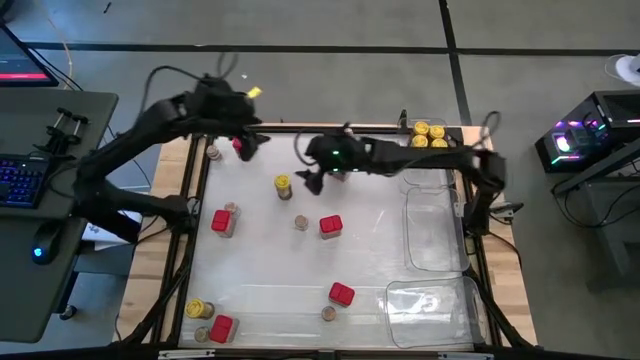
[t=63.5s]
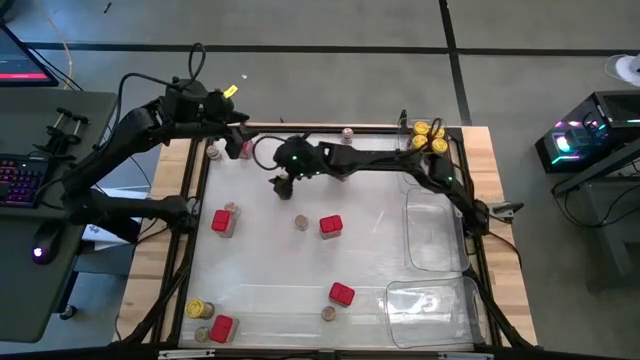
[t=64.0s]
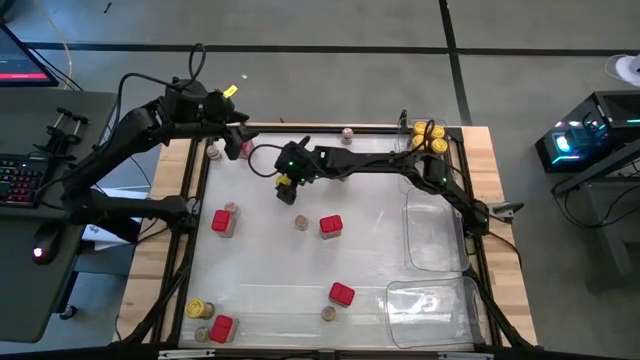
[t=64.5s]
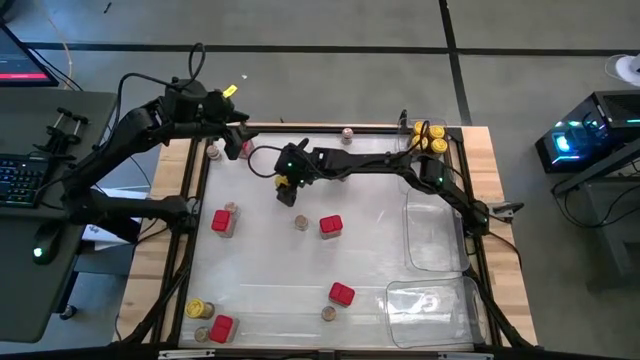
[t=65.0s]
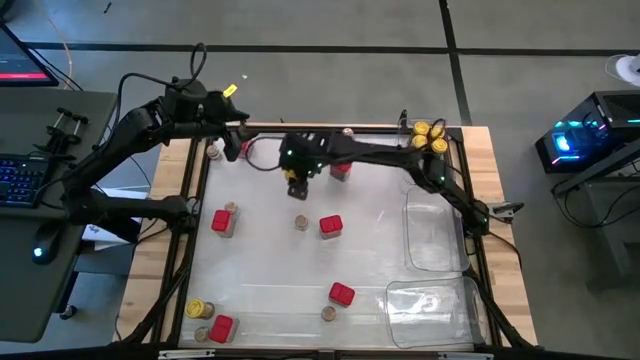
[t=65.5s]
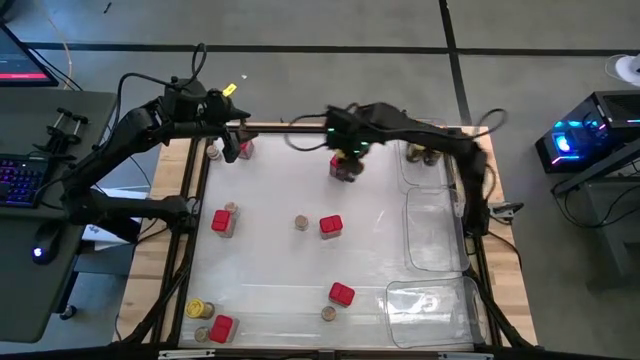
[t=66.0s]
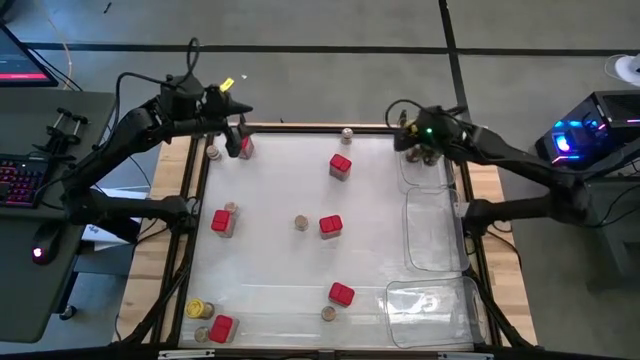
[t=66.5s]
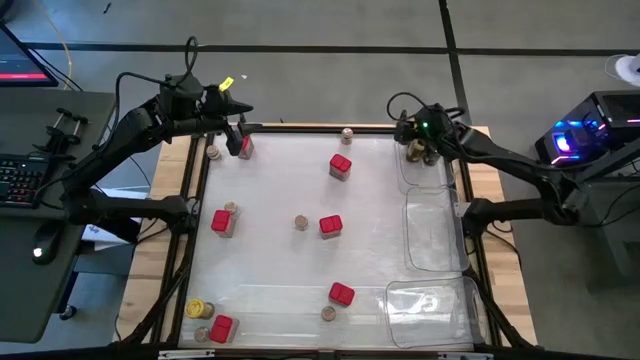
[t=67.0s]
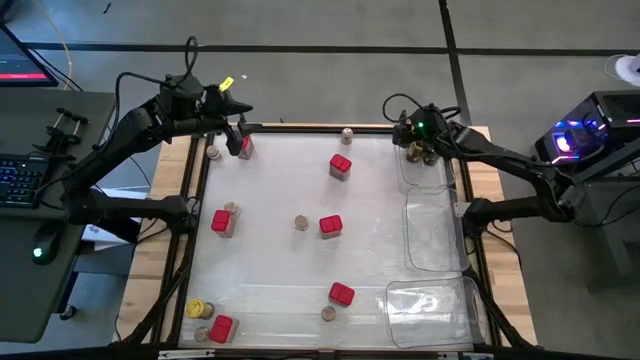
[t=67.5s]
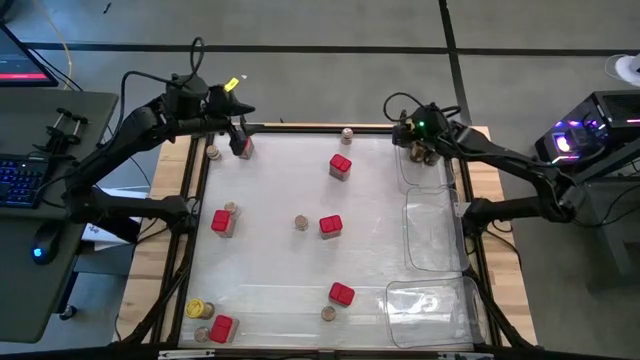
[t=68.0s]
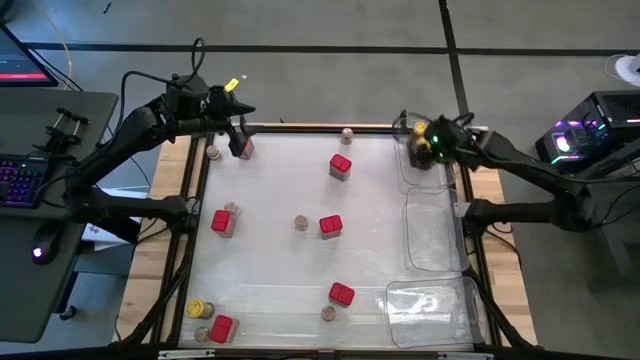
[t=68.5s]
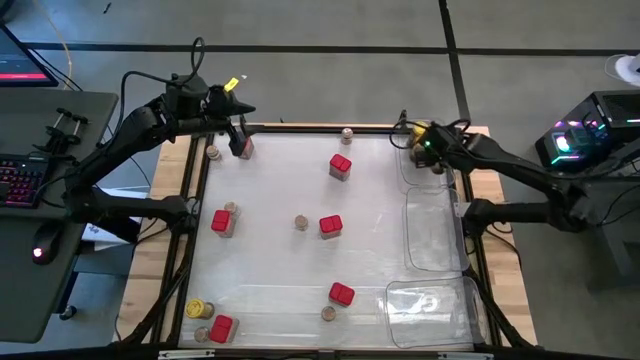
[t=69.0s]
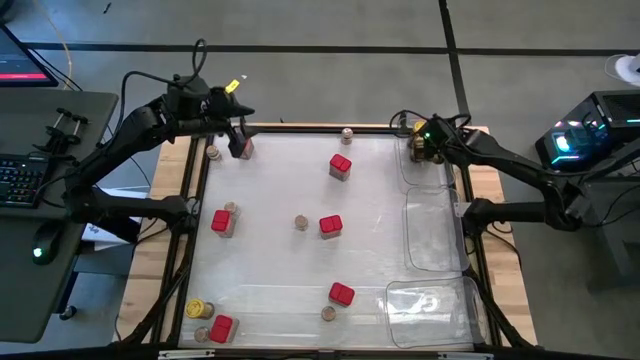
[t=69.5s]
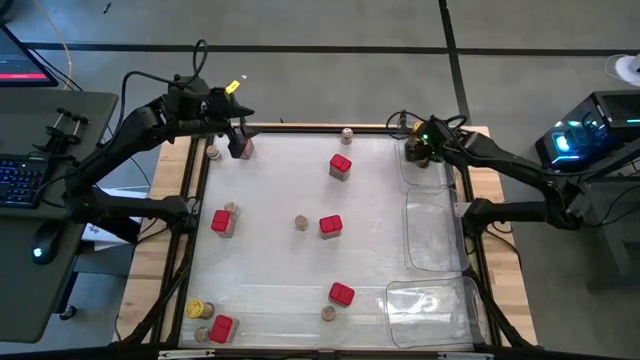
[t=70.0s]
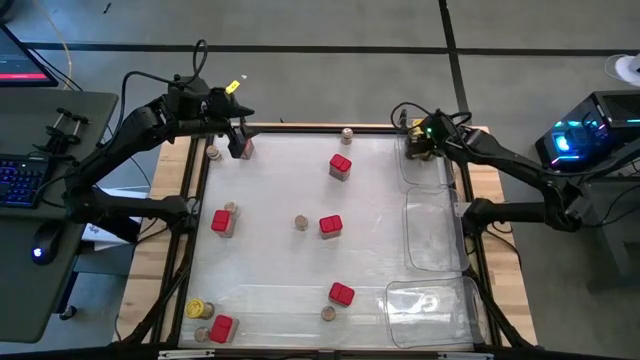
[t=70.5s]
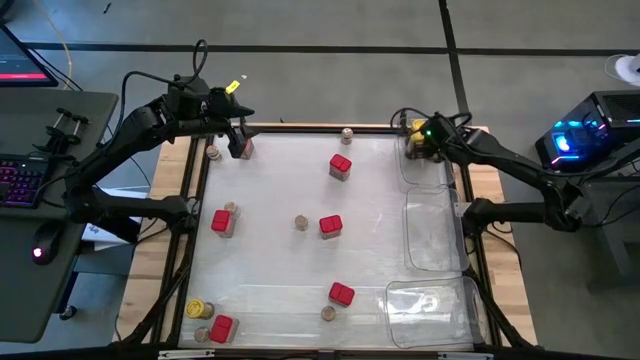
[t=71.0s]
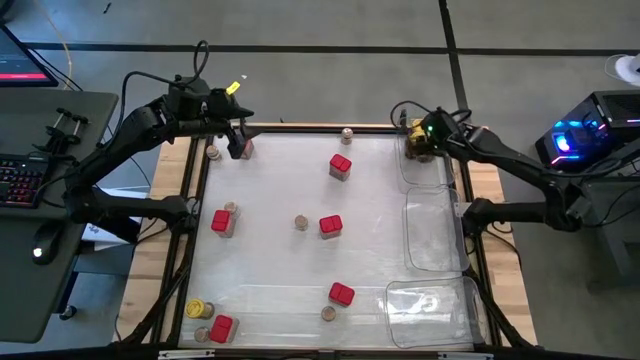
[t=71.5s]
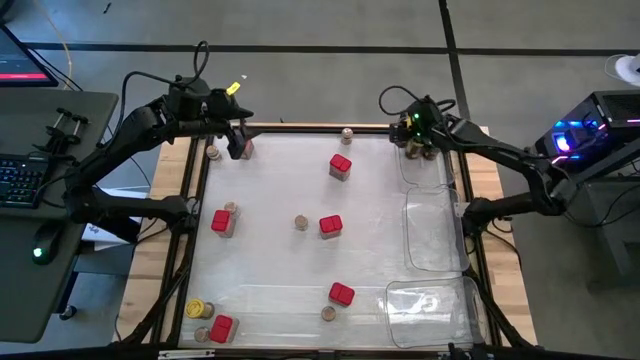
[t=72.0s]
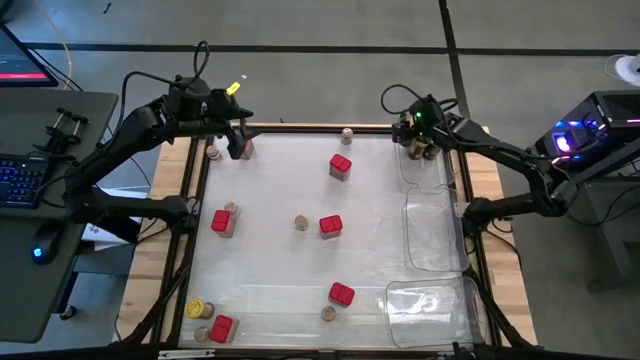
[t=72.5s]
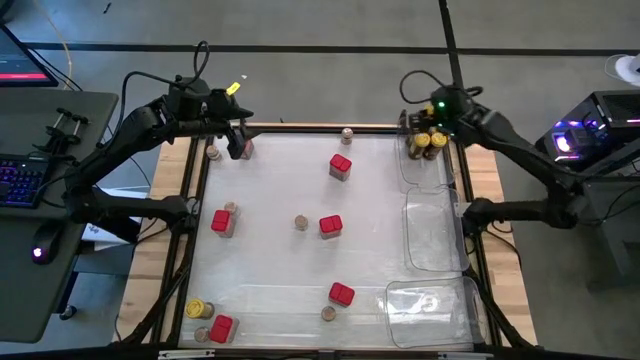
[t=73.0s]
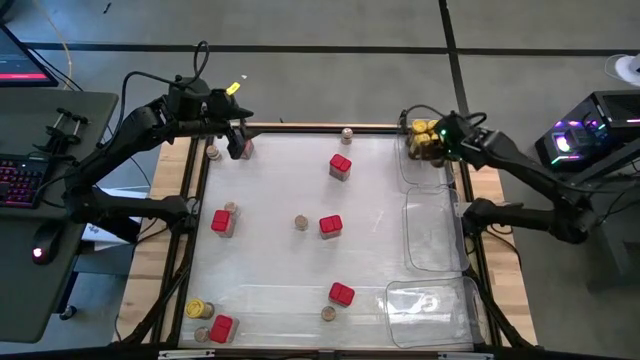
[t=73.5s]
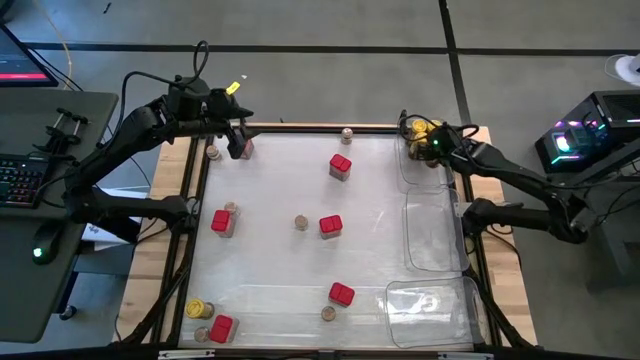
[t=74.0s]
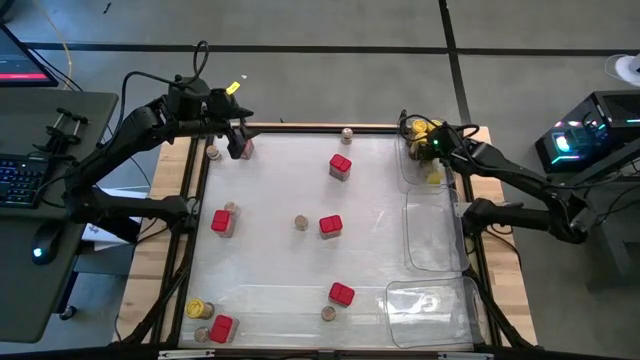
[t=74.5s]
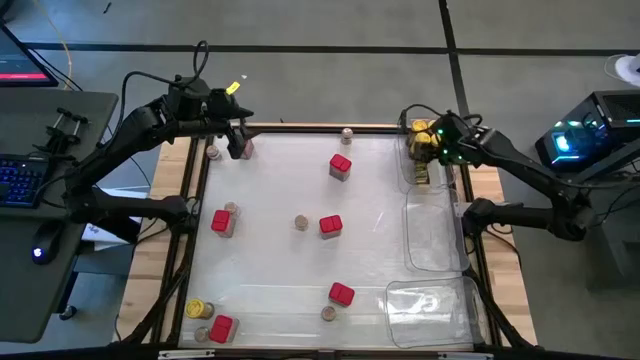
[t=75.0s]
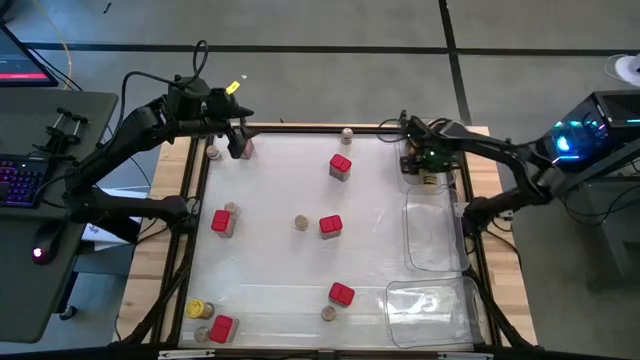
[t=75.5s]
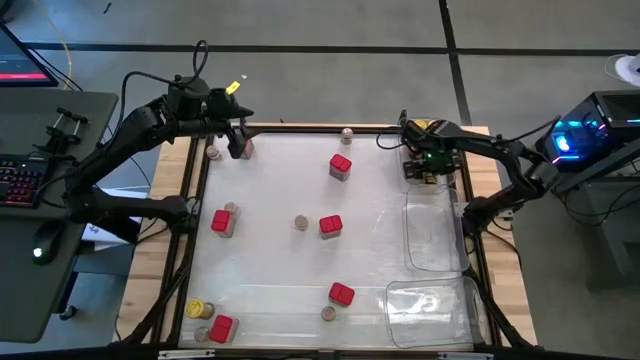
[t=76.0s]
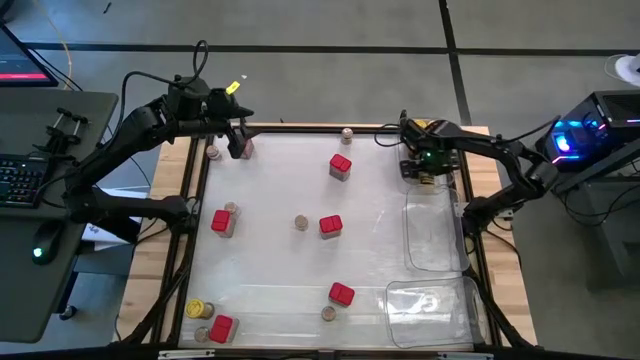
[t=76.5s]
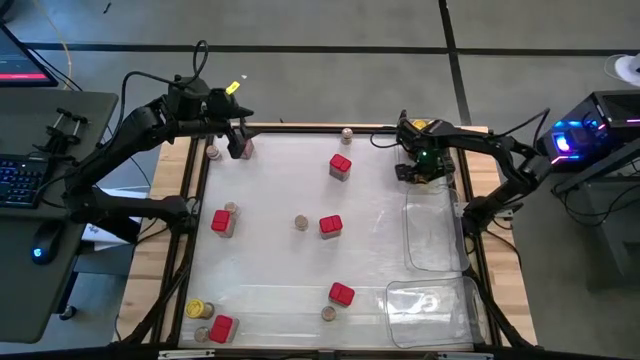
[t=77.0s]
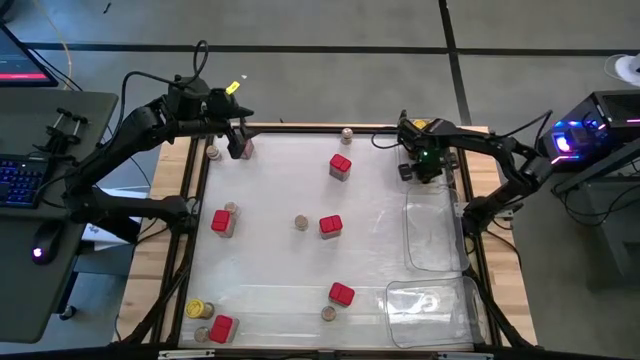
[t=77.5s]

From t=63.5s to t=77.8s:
Task: Sort spices by type
Put the yellow seasoning bottle into the top transparent bin
